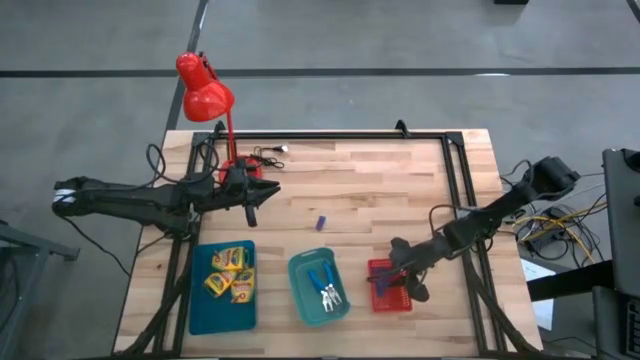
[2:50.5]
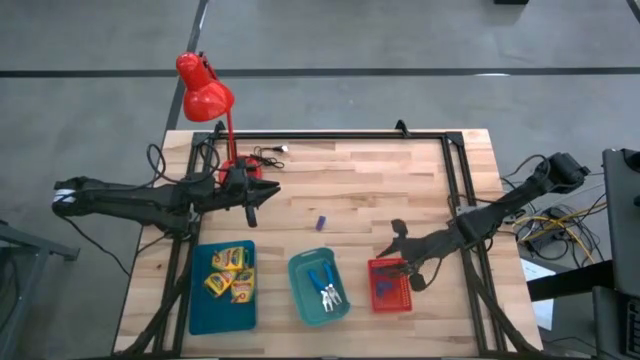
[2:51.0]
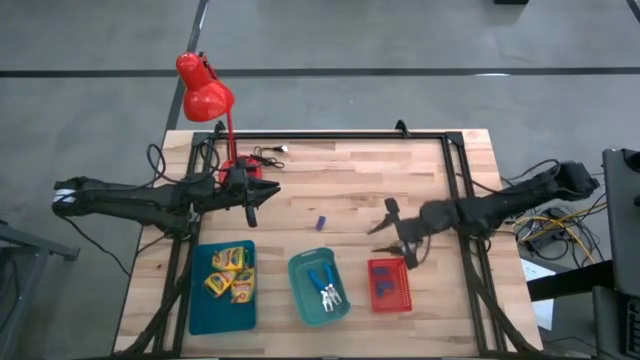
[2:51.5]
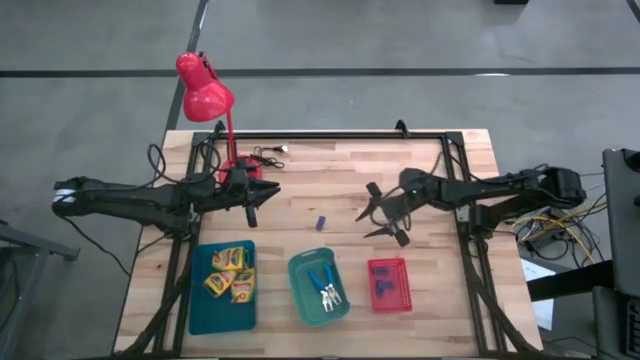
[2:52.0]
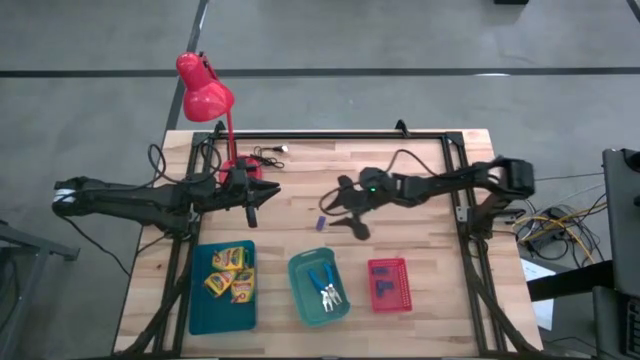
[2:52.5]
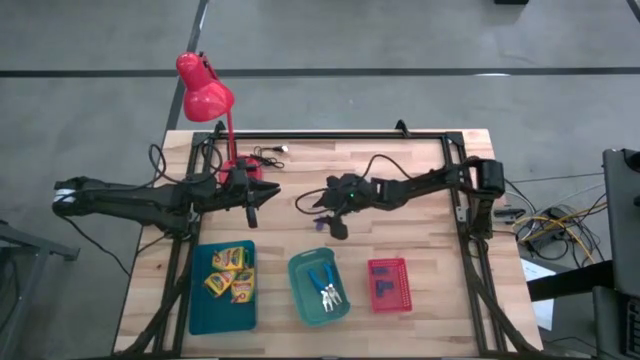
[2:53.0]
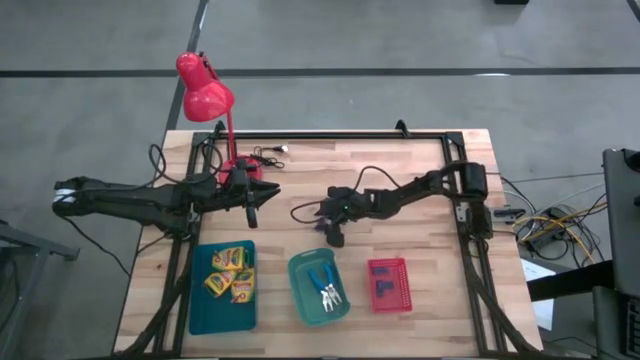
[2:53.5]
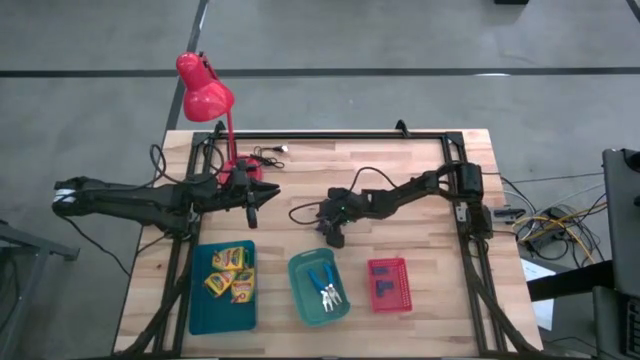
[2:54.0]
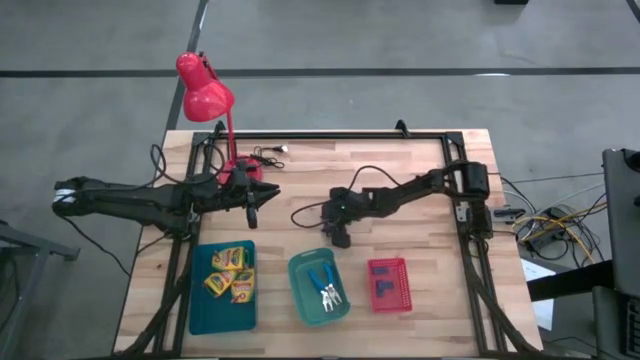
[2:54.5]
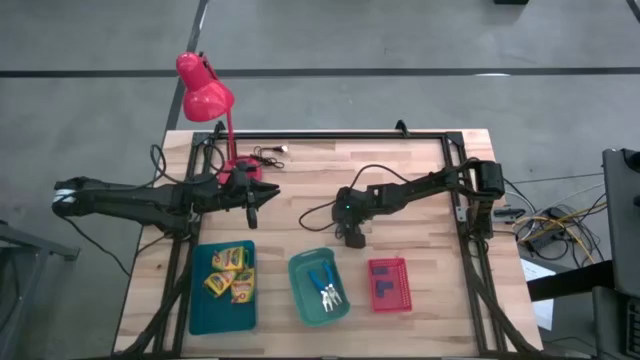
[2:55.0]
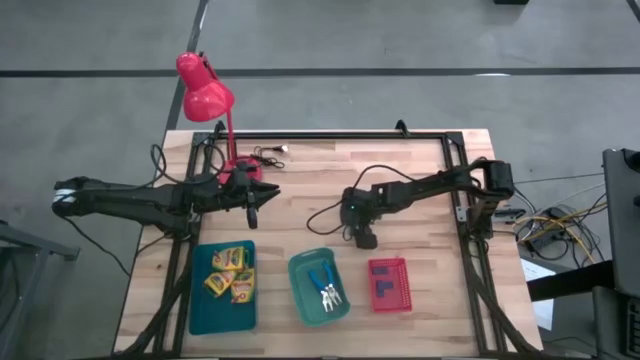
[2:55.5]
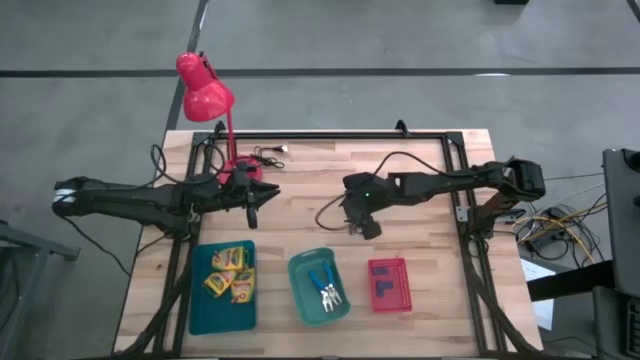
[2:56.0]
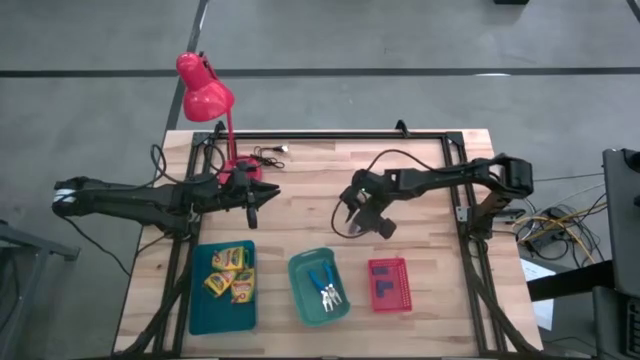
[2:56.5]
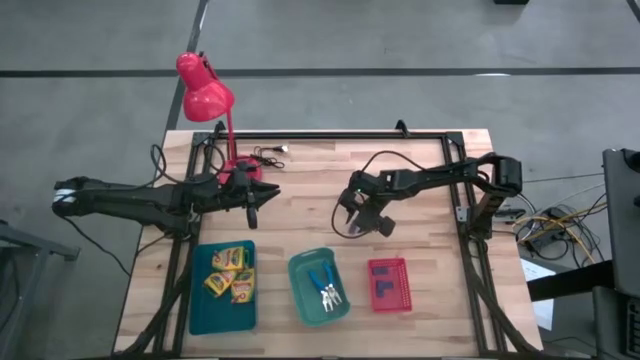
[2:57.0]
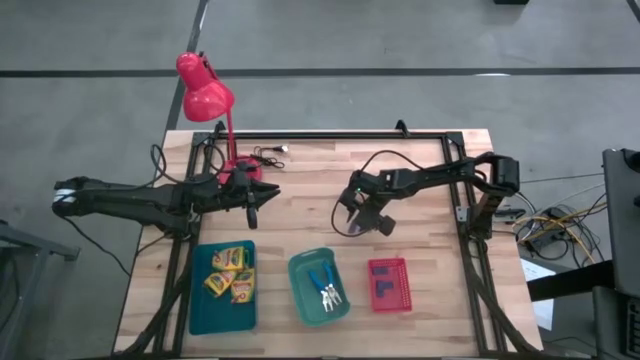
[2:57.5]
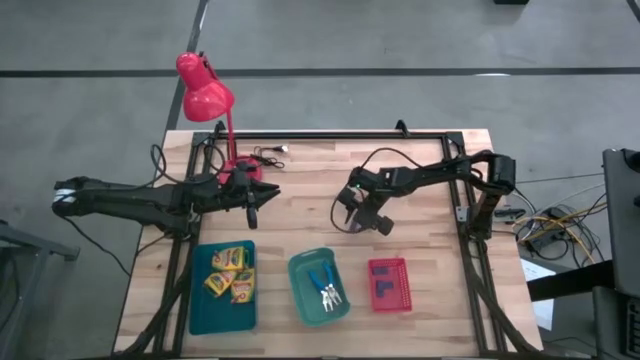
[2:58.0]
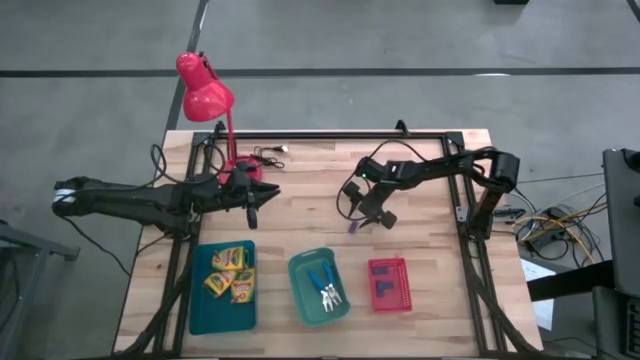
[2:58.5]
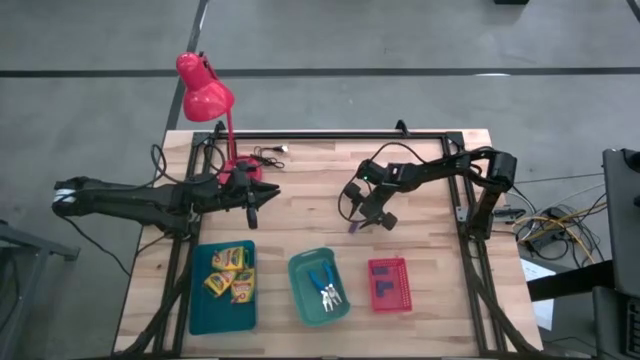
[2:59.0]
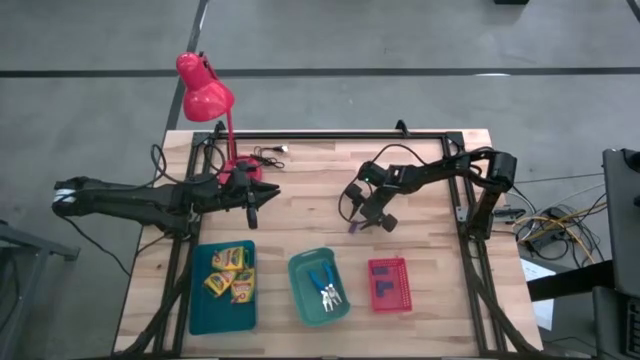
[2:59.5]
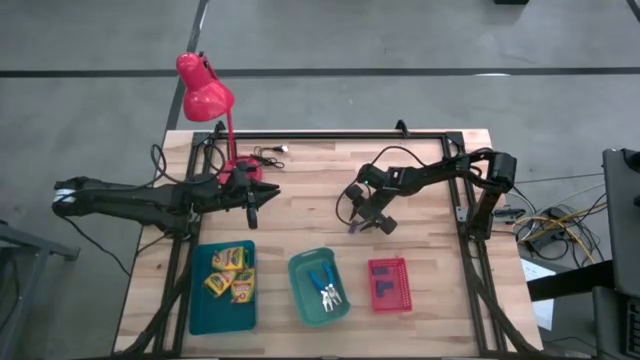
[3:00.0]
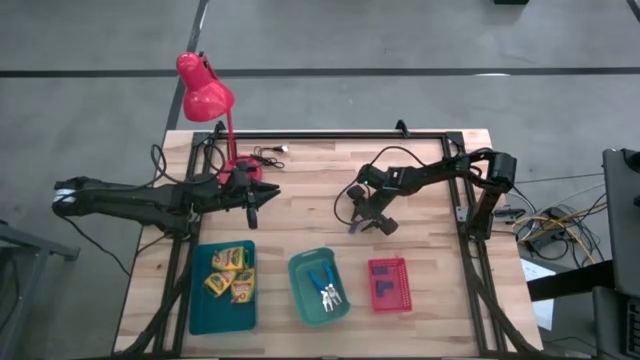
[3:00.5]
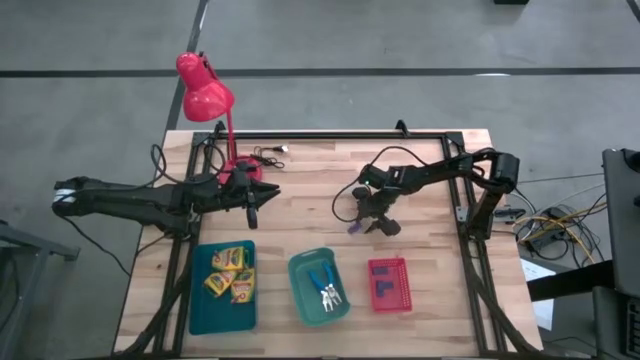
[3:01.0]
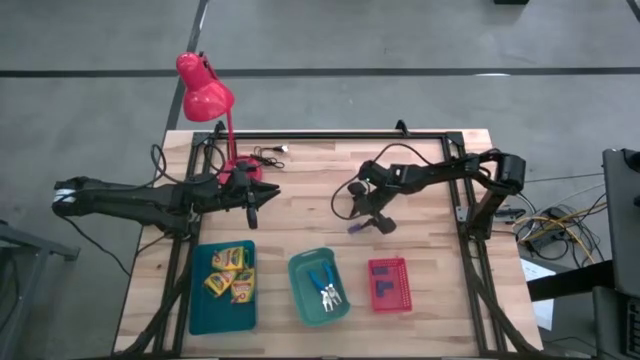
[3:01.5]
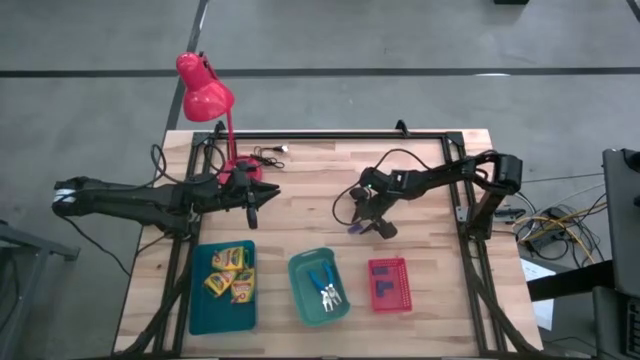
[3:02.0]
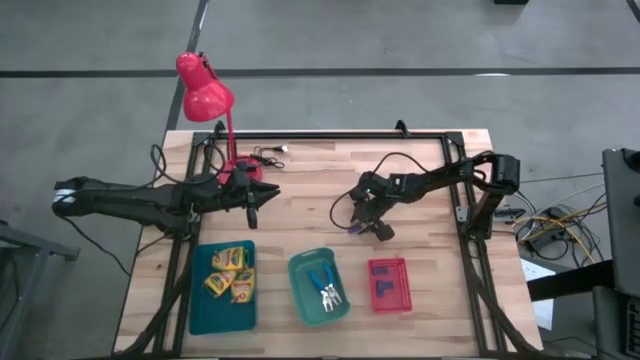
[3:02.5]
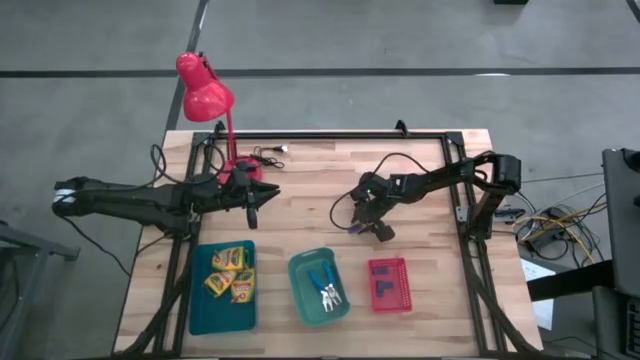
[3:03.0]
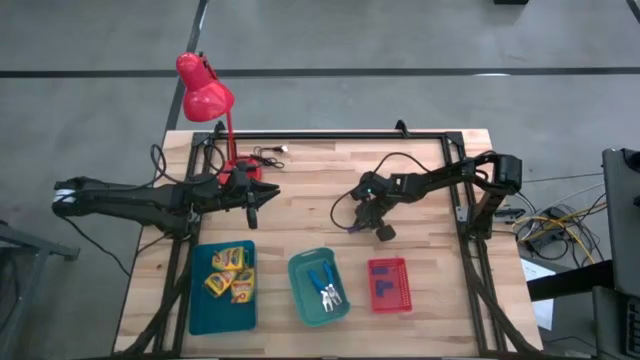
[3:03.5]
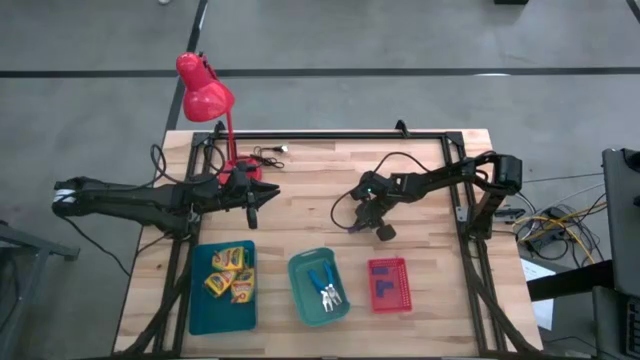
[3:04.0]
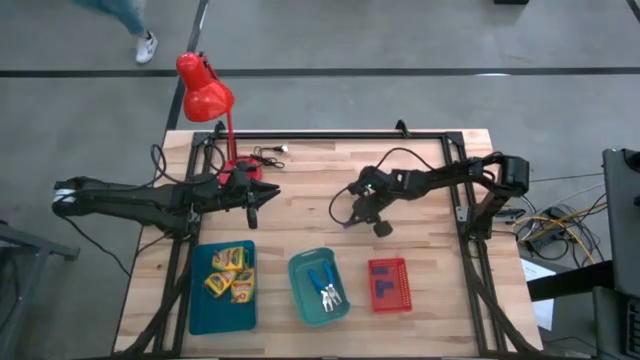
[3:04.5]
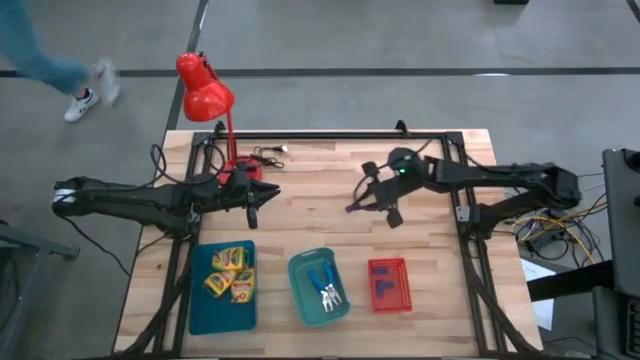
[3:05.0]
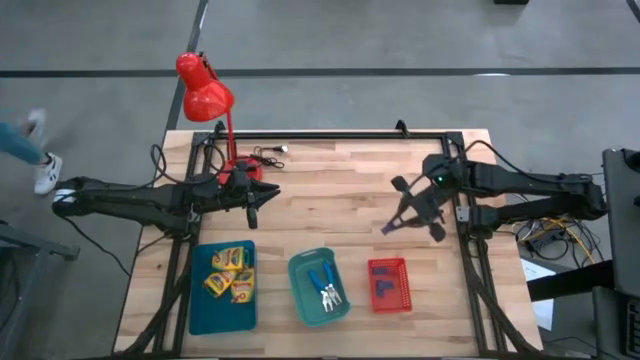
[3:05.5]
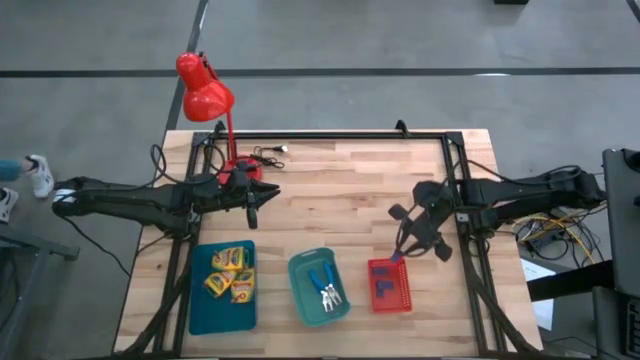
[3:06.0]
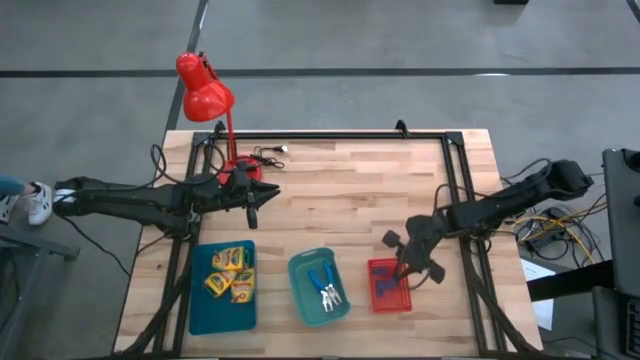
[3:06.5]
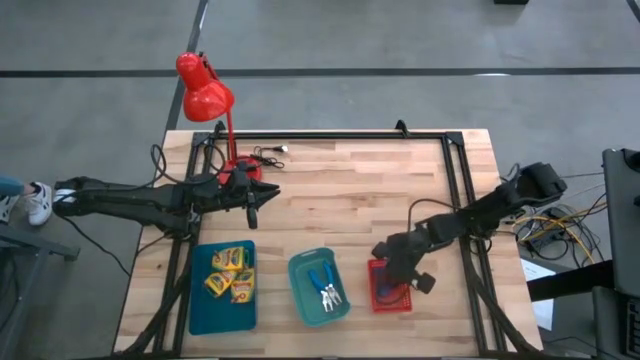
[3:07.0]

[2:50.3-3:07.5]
Task: Pick & Place School Supplies
Put the purple eraser into the red bin

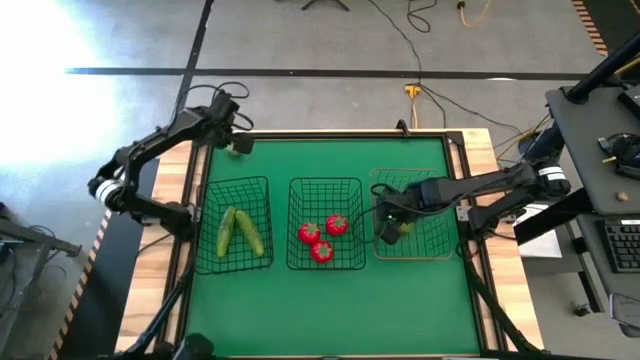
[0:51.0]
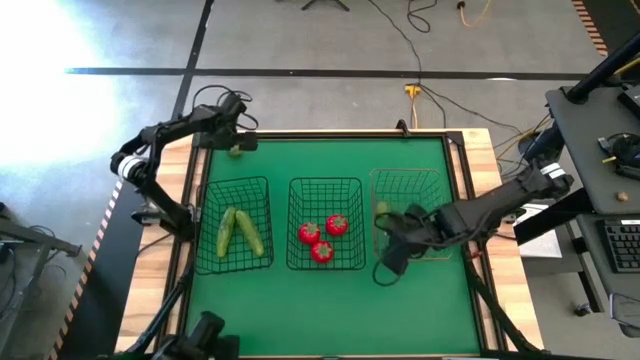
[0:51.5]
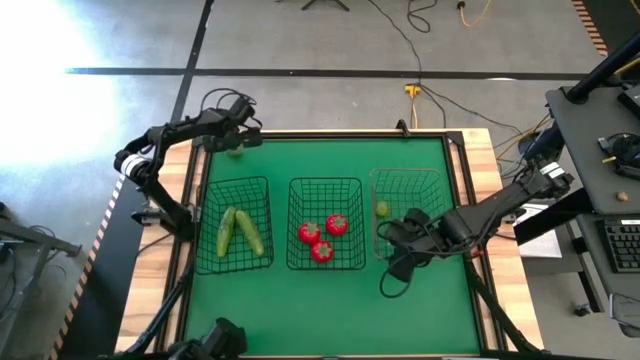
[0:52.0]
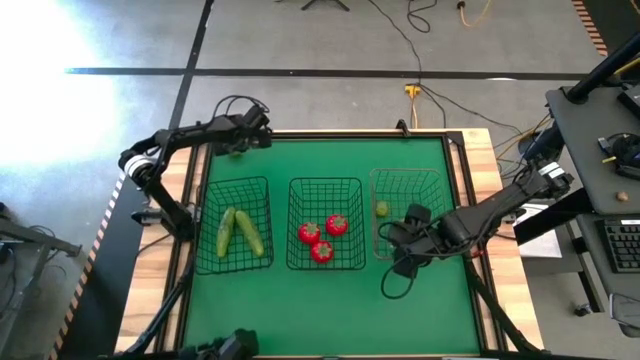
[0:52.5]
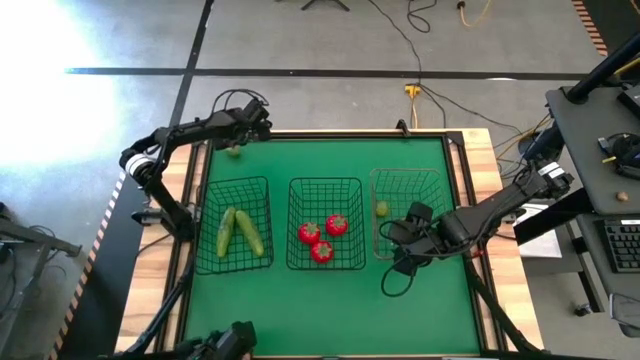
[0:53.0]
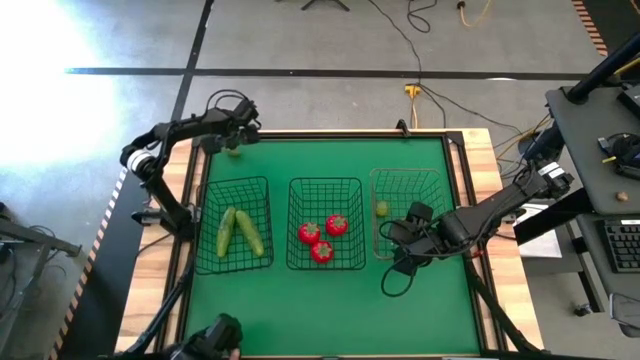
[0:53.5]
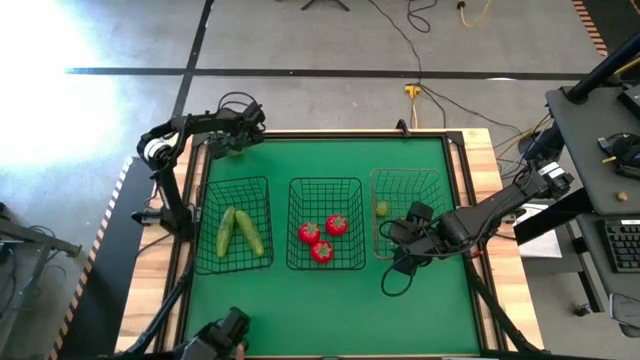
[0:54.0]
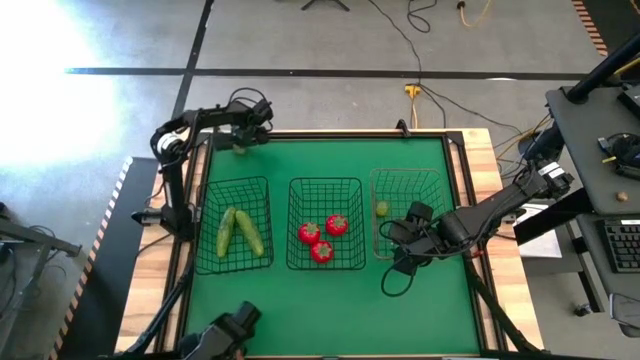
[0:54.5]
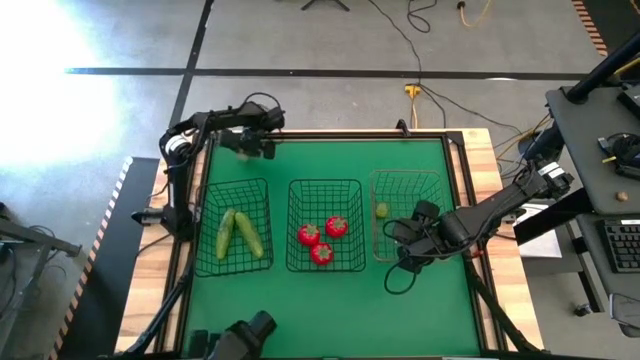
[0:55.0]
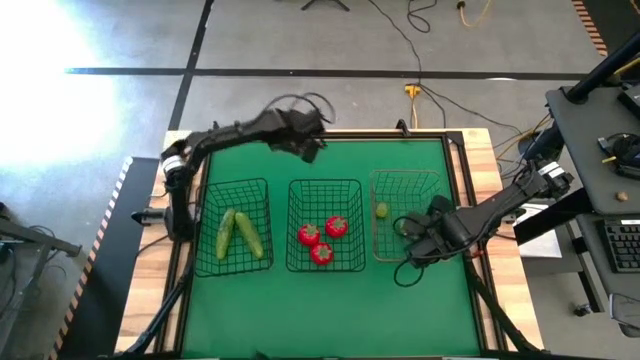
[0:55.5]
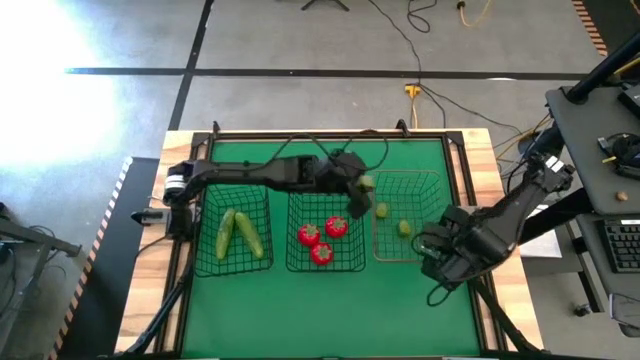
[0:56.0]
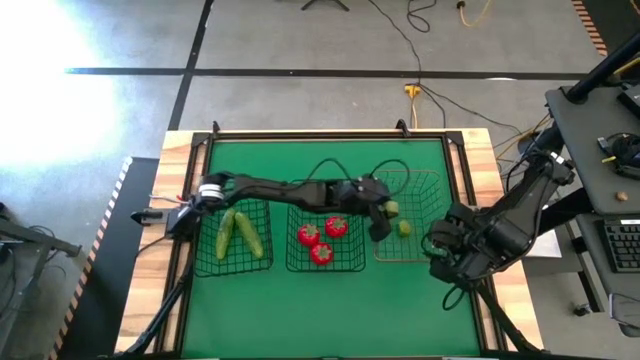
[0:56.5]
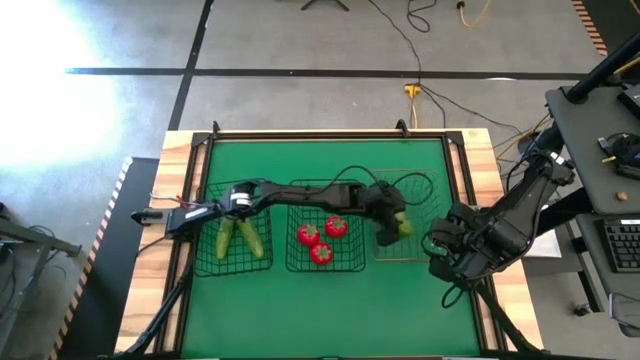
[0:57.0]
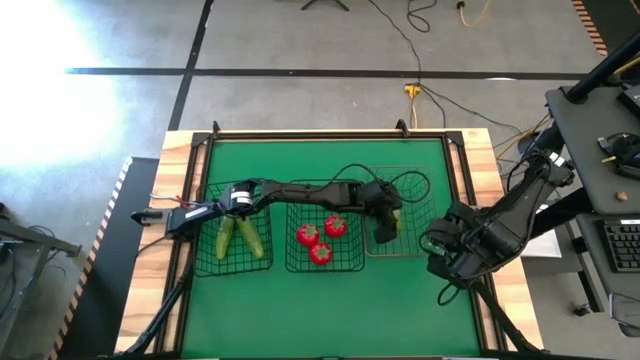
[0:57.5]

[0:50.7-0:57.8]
Task: Sort produce into baskets
Put the lime into the gold wire basket
